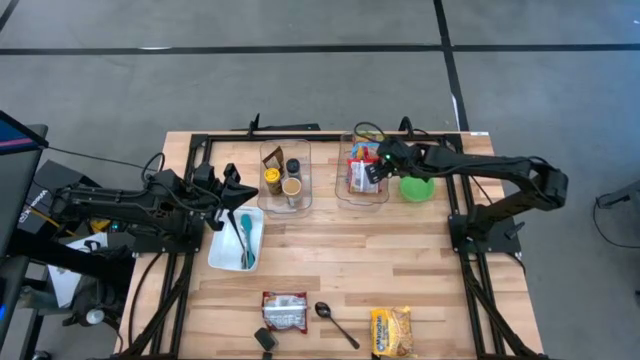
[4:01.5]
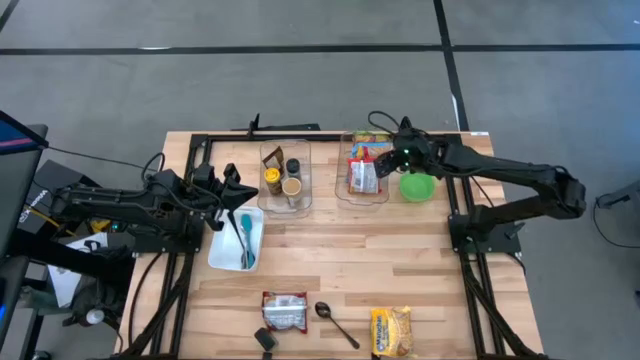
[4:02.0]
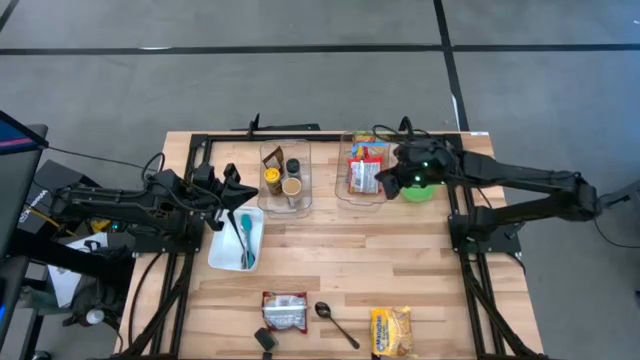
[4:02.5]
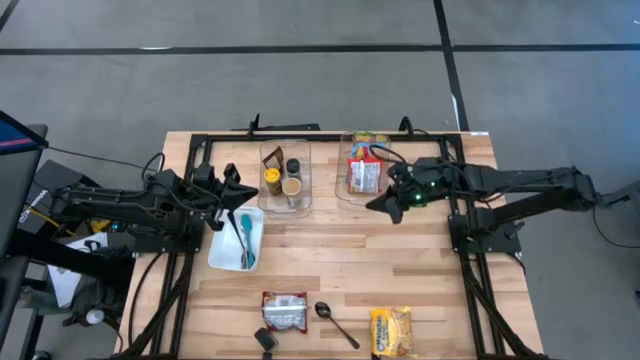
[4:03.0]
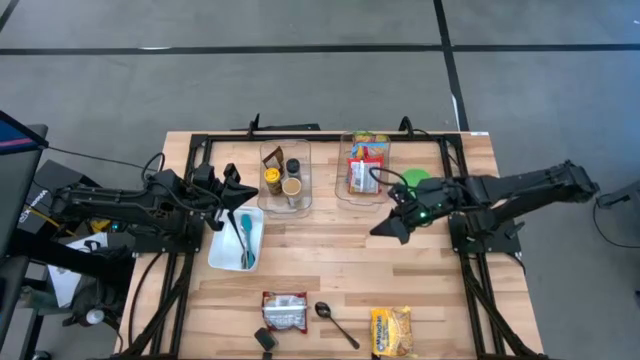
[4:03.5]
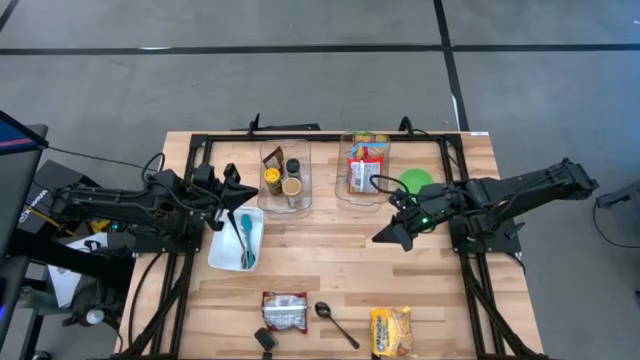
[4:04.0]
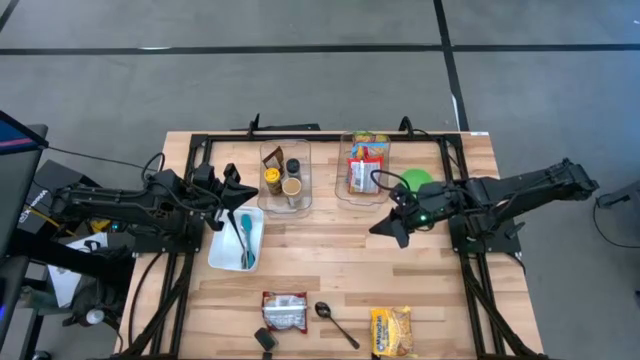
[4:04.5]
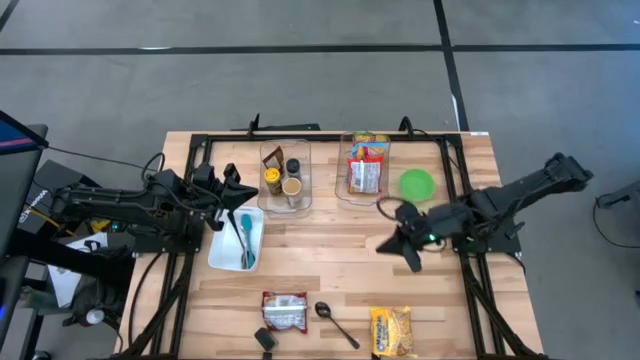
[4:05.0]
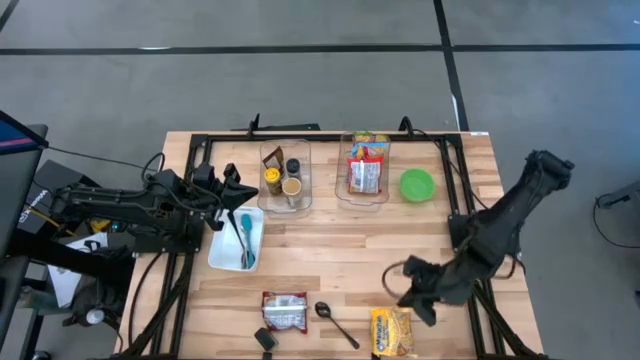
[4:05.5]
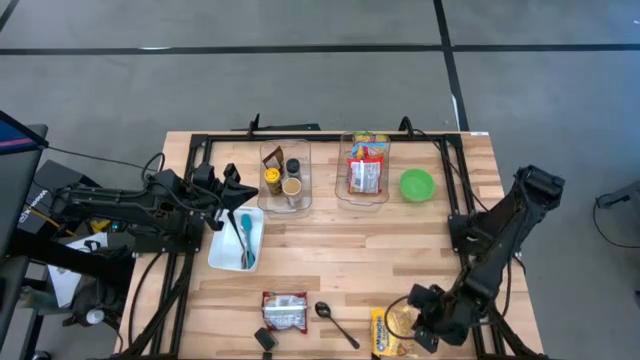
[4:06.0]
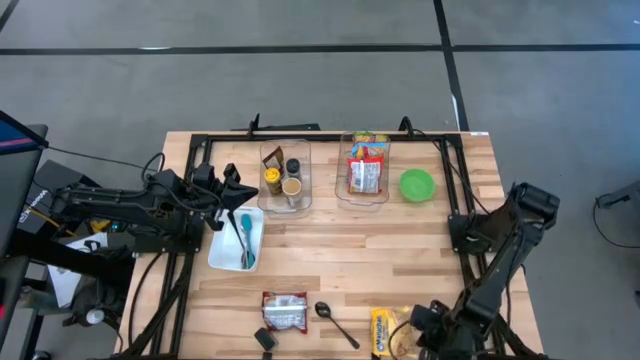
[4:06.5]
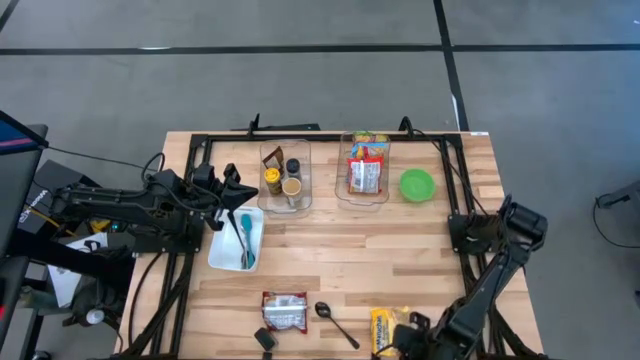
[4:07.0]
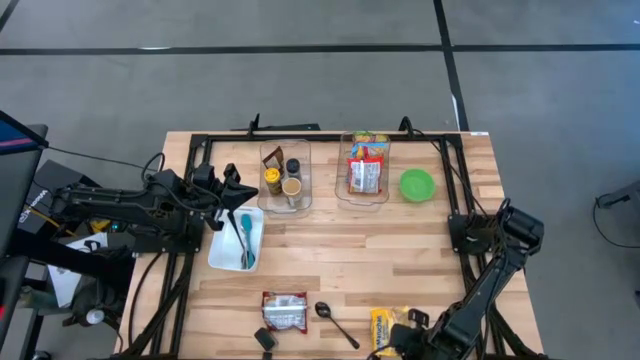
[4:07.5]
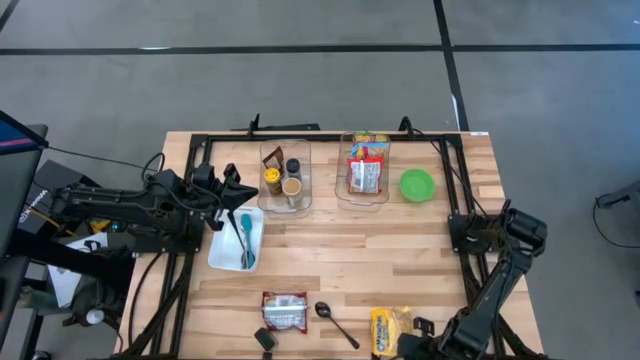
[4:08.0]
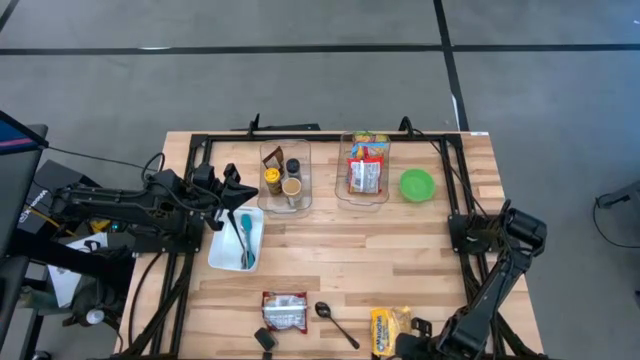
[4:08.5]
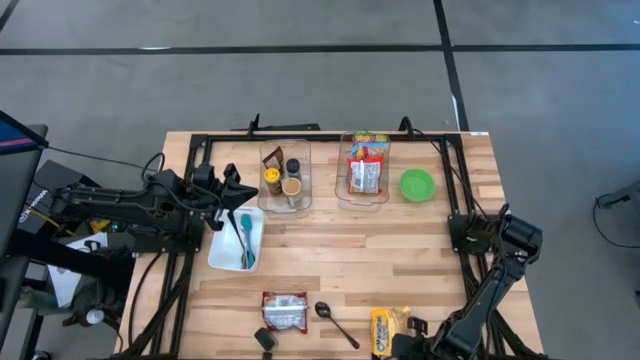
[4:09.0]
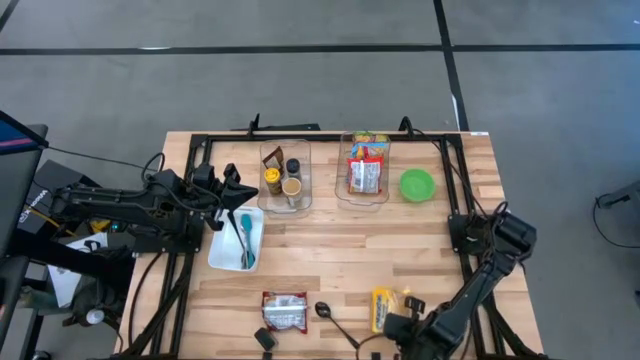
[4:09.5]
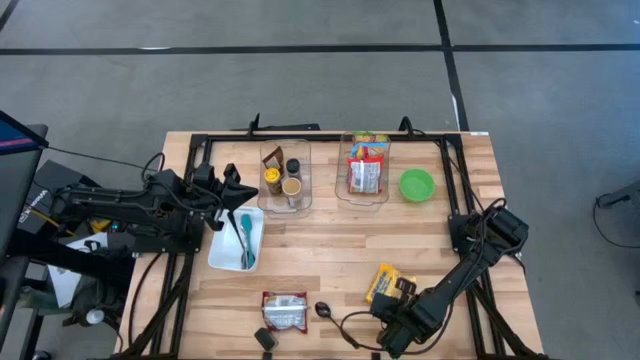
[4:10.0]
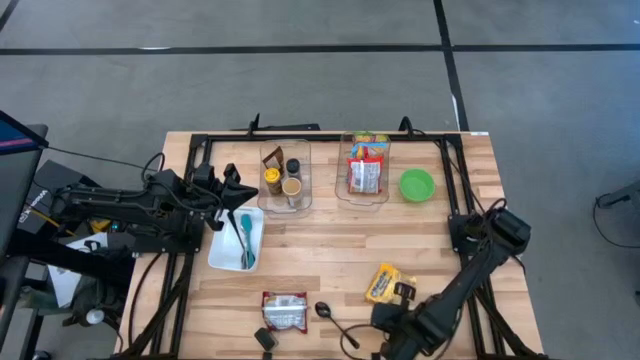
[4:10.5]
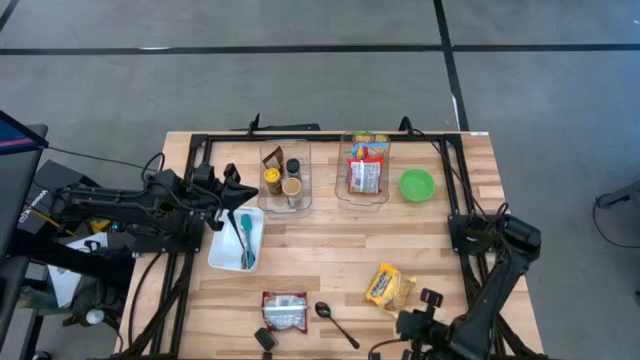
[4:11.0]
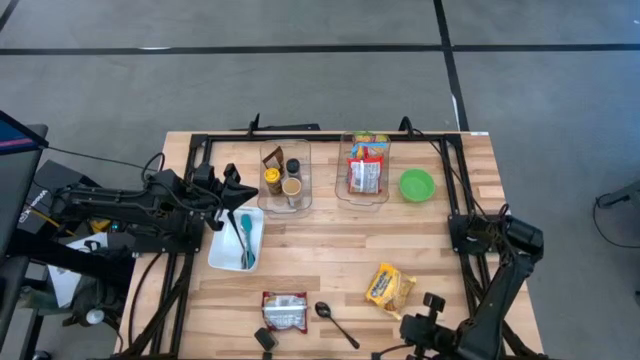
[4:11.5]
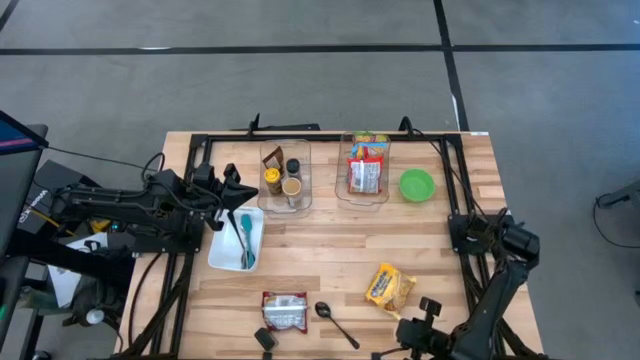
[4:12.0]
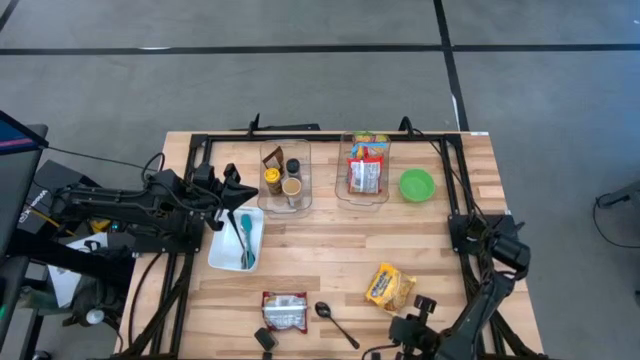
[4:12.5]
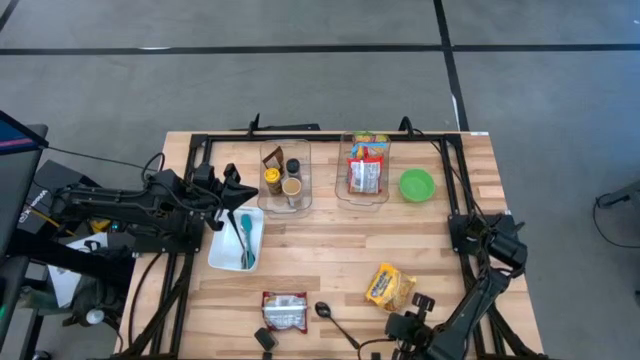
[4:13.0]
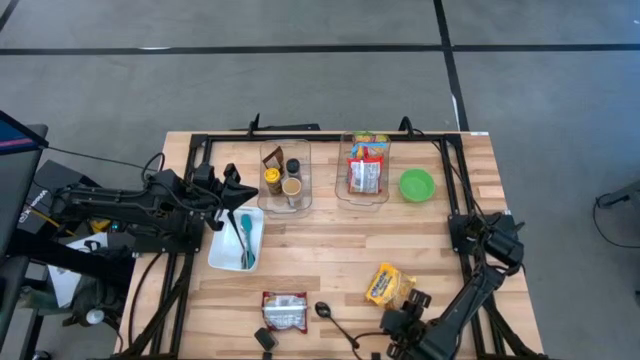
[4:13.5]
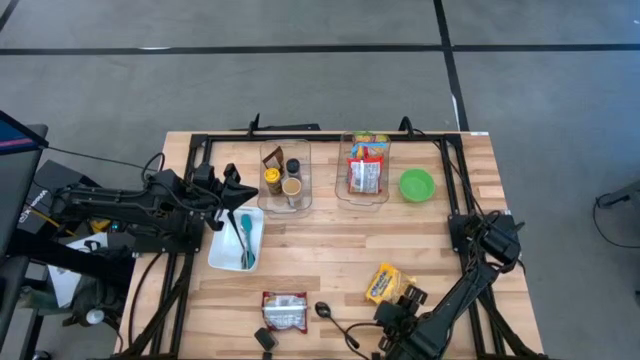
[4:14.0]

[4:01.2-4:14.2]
Task: Pick & Place Food Item
Put the yellow noodle pack into the right transparent bin

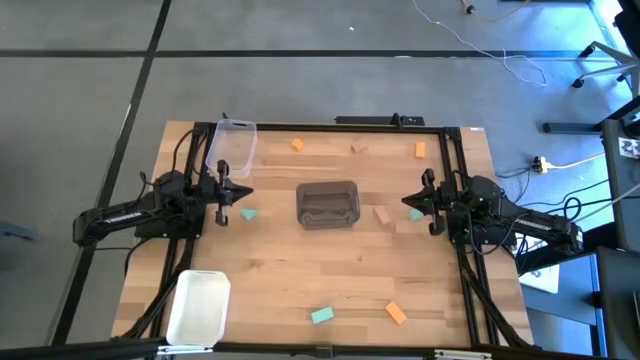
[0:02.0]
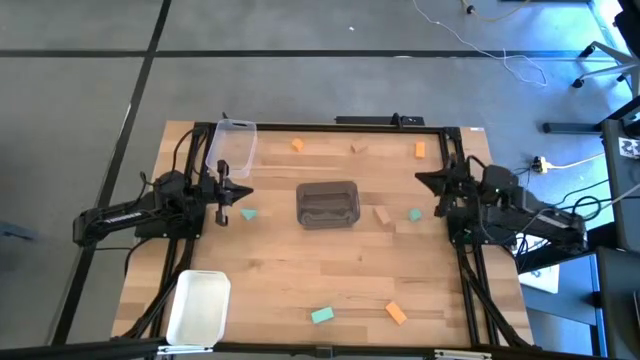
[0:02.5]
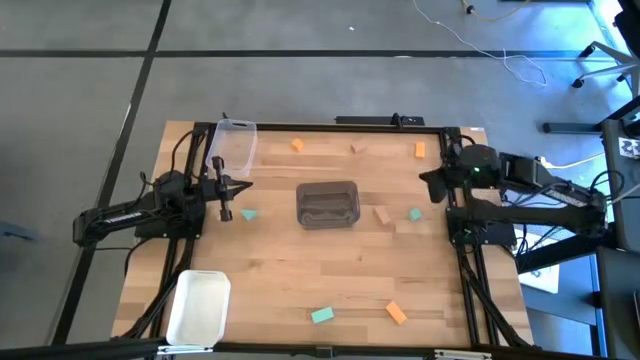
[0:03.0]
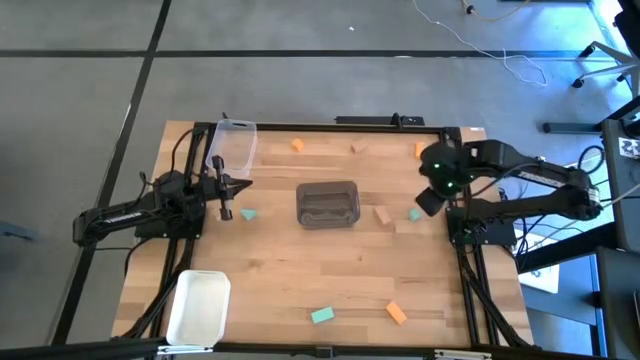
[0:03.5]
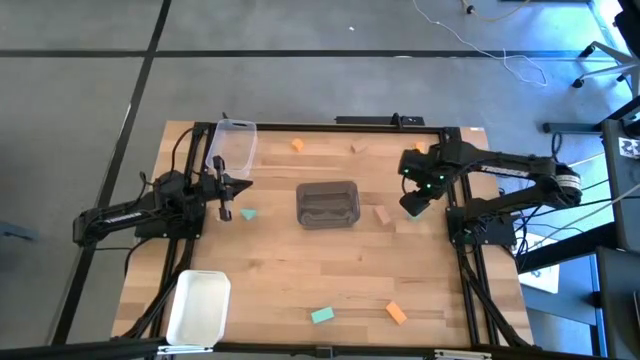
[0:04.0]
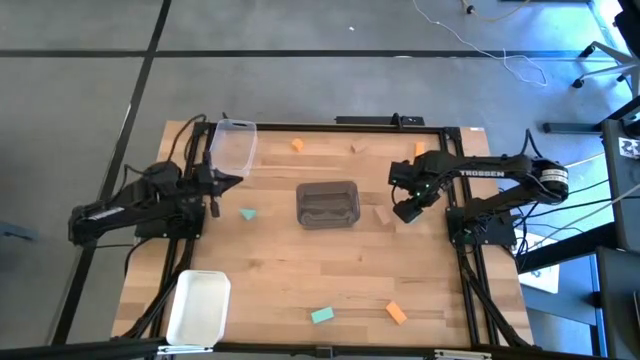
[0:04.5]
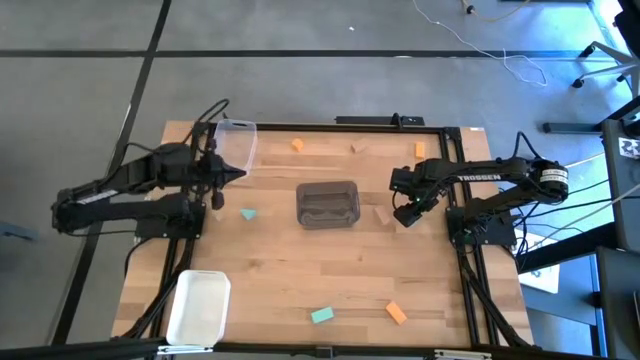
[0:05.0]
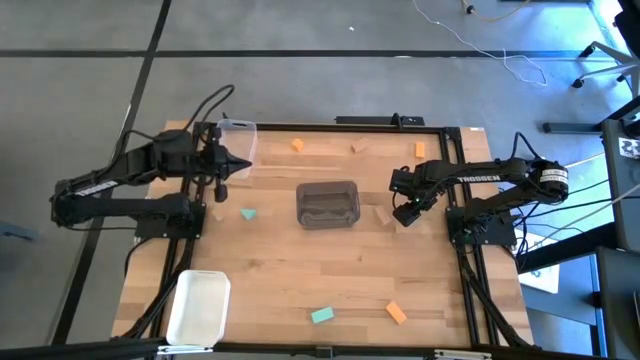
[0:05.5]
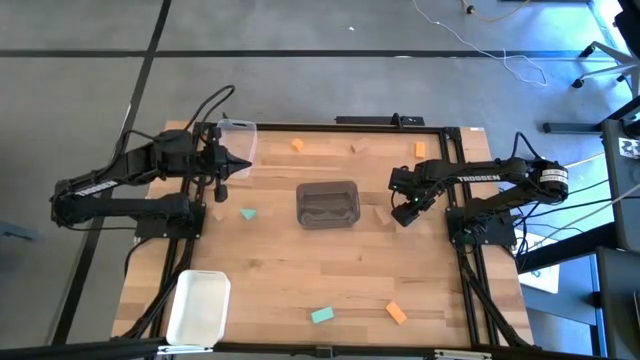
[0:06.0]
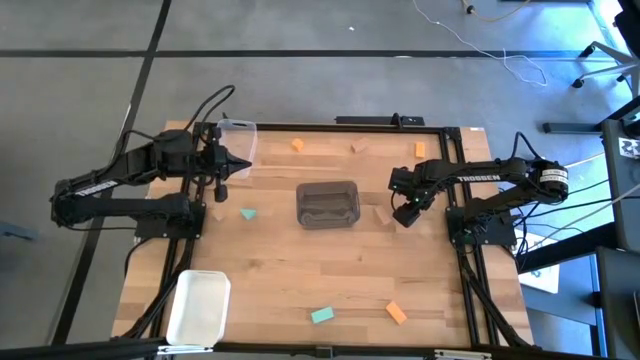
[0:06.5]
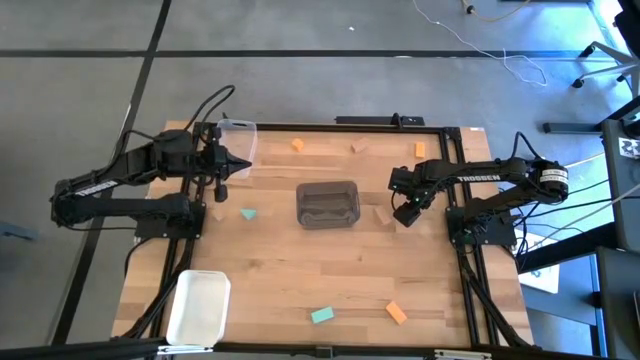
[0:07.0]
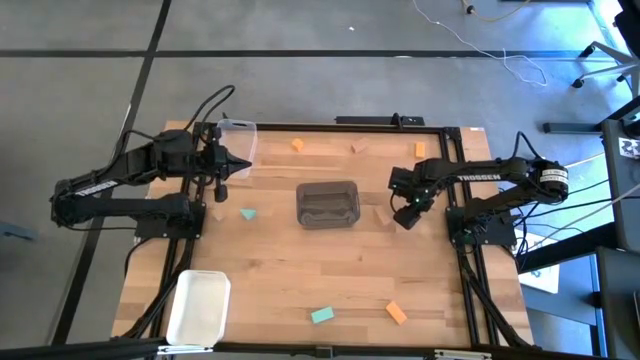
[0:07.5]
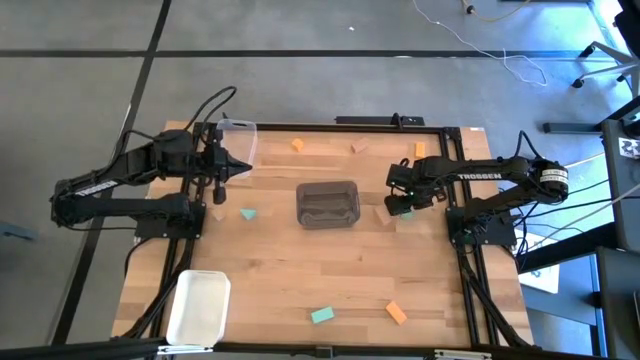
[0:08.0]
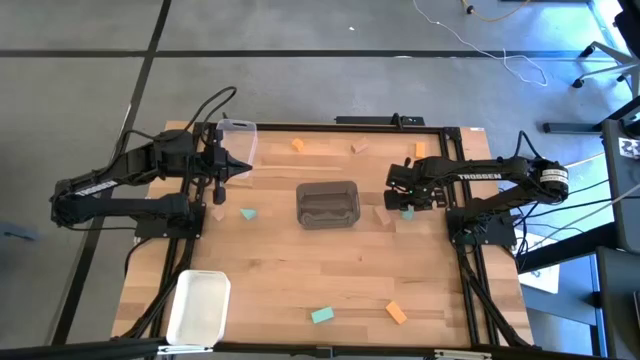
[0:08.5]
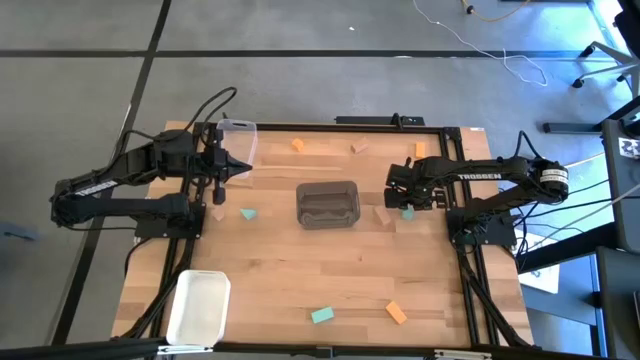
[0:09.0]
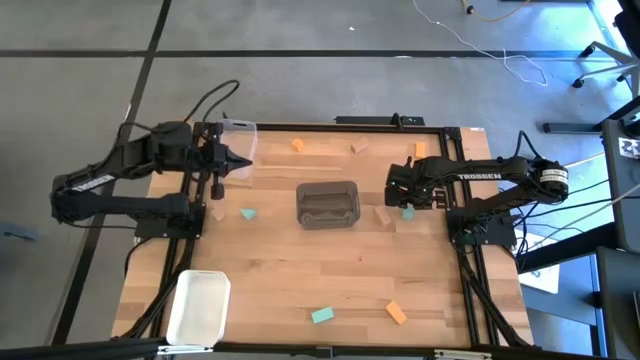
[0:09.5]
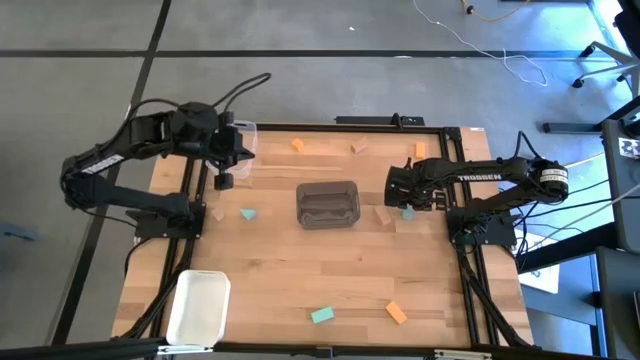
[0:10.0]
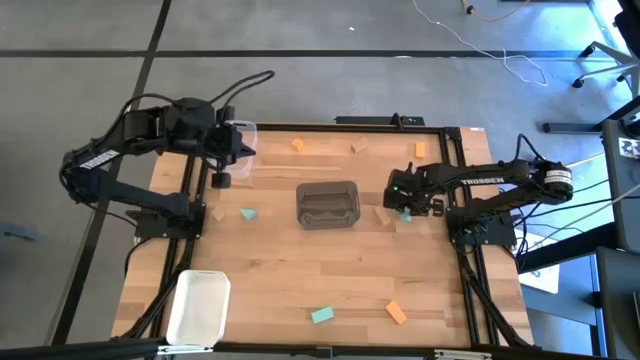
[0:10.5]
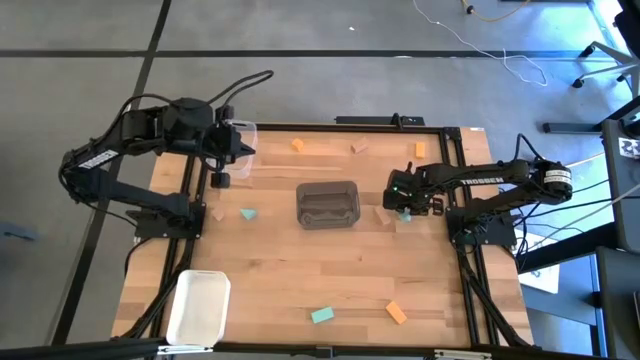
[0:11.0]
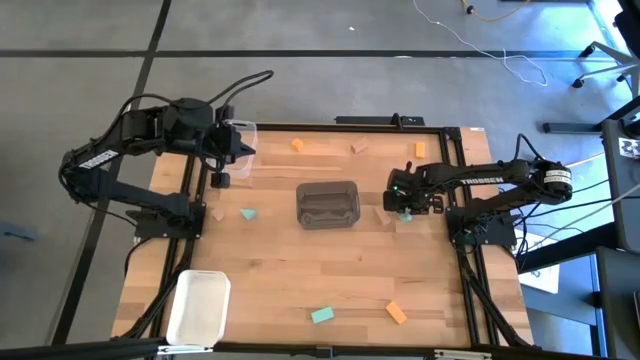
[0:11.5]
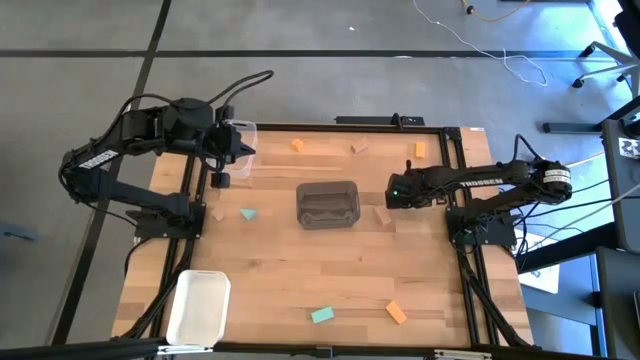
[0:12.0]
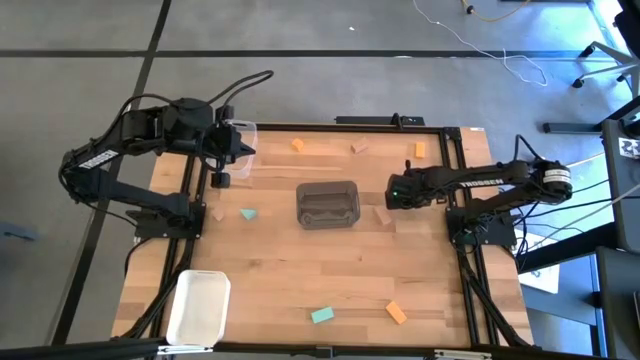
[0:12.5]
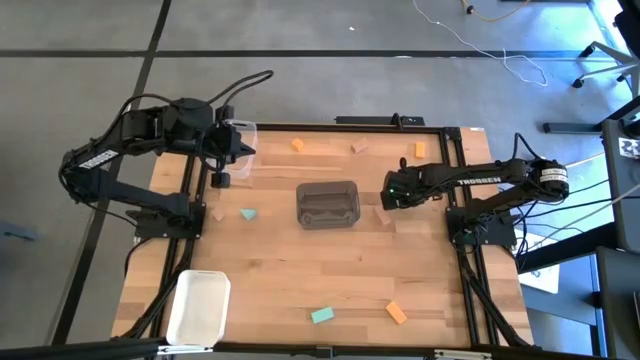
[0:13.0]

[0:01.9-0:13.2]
Task: Sort & place blocks by color
Put the top right light blue block into the black transparent bin
